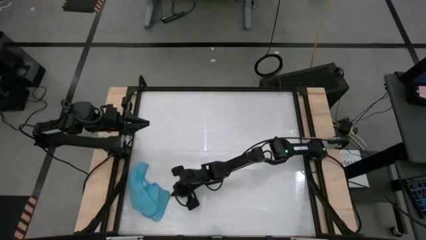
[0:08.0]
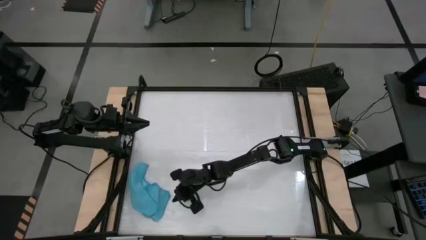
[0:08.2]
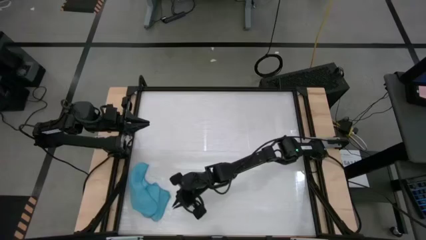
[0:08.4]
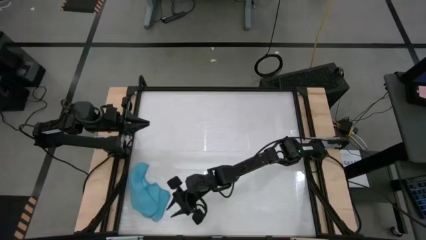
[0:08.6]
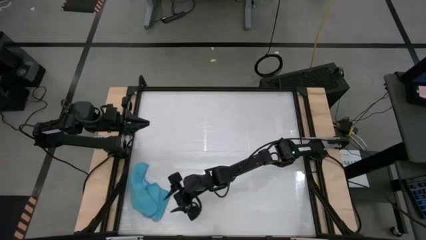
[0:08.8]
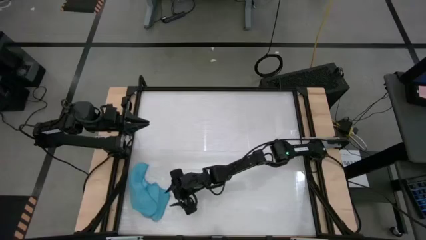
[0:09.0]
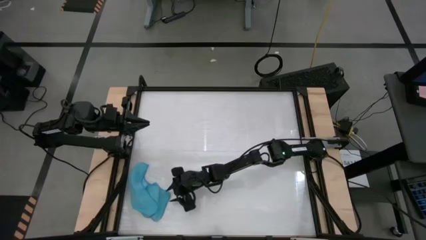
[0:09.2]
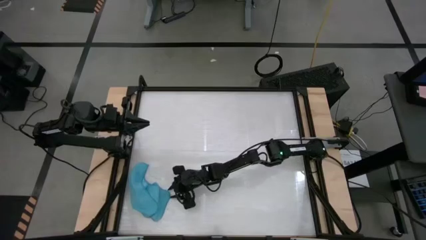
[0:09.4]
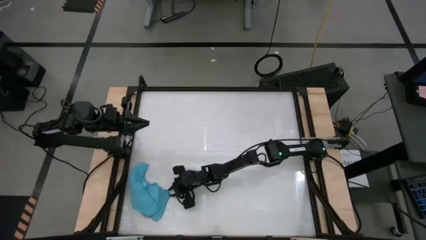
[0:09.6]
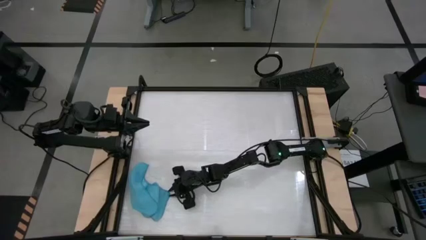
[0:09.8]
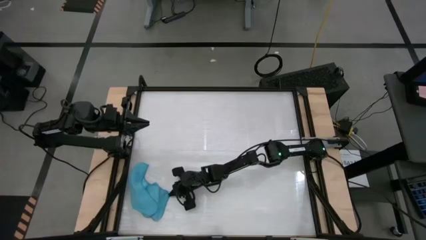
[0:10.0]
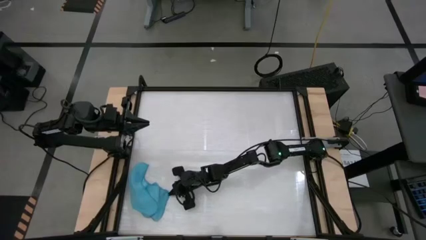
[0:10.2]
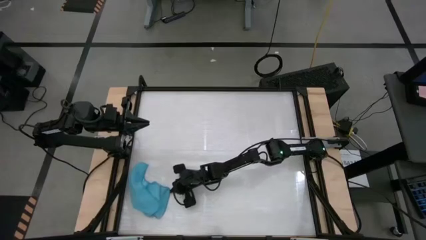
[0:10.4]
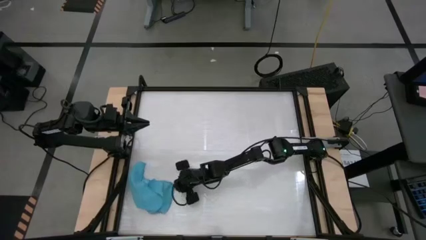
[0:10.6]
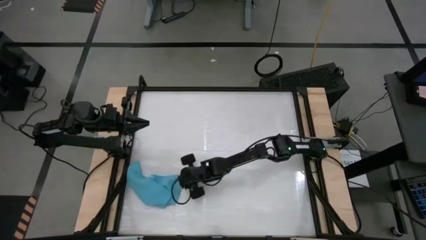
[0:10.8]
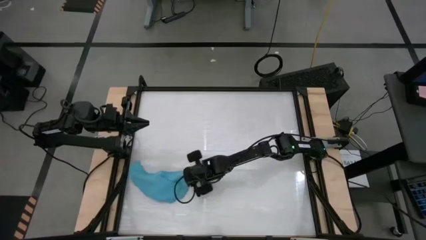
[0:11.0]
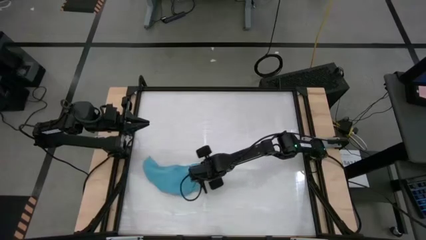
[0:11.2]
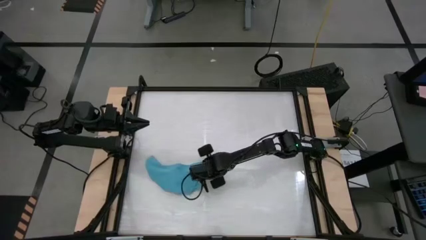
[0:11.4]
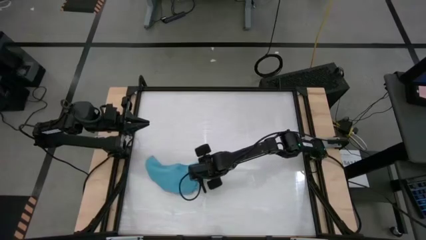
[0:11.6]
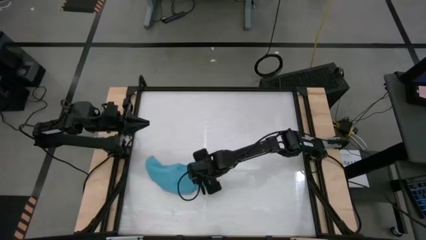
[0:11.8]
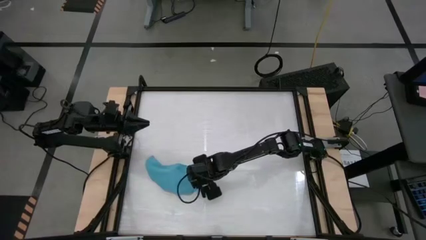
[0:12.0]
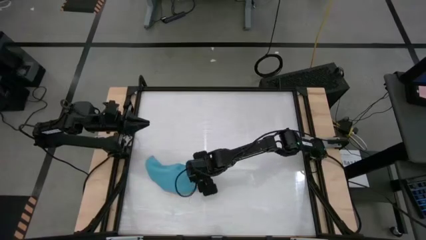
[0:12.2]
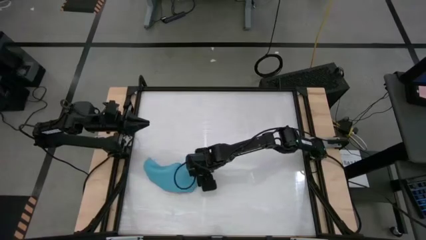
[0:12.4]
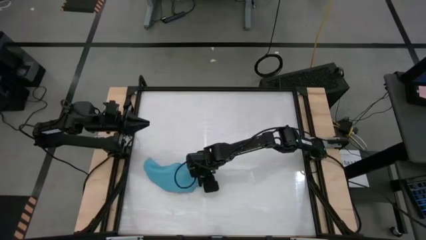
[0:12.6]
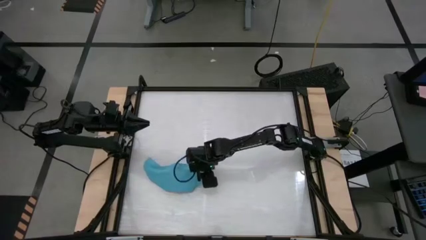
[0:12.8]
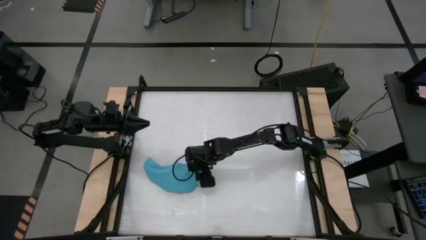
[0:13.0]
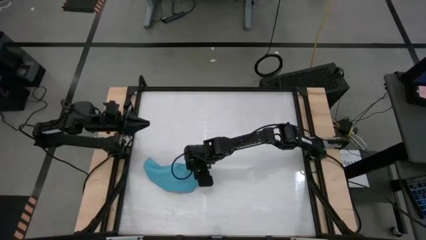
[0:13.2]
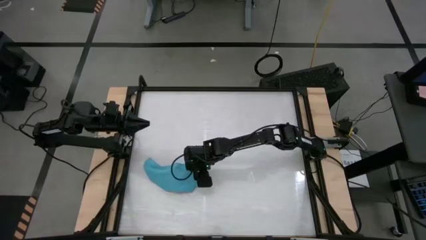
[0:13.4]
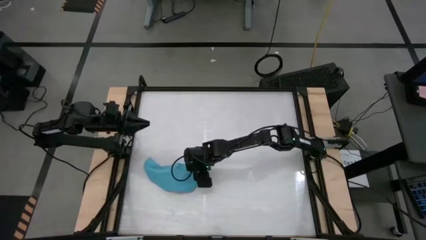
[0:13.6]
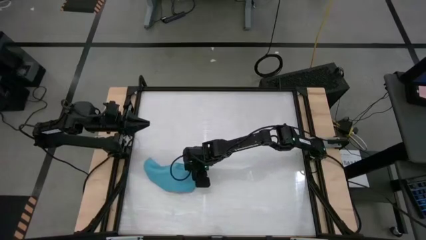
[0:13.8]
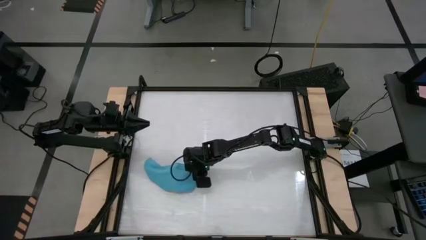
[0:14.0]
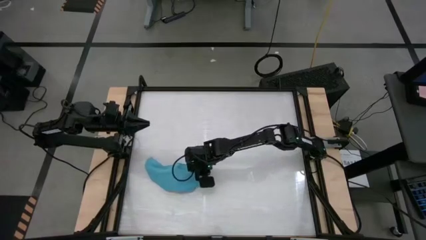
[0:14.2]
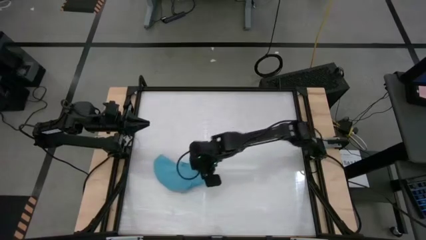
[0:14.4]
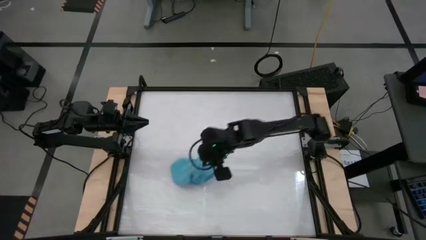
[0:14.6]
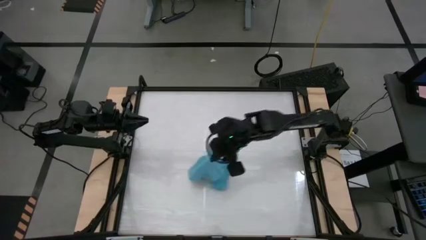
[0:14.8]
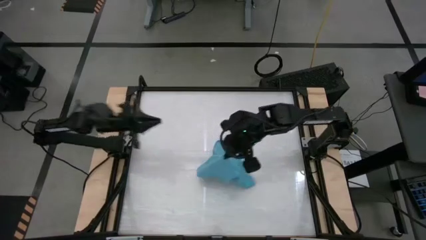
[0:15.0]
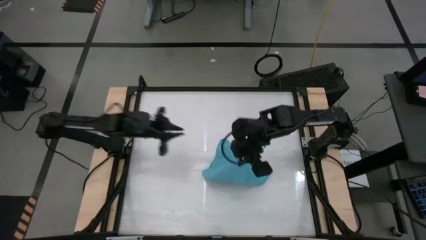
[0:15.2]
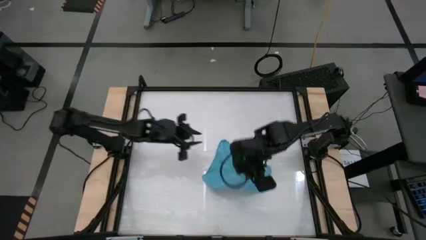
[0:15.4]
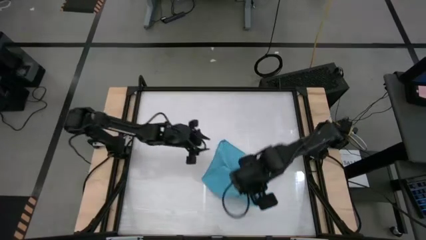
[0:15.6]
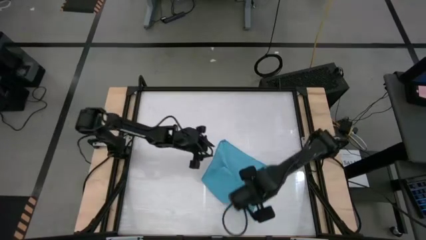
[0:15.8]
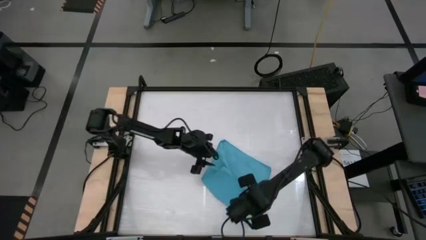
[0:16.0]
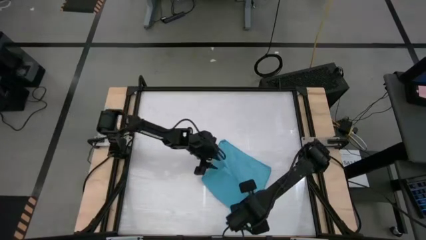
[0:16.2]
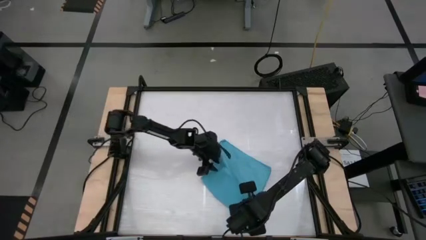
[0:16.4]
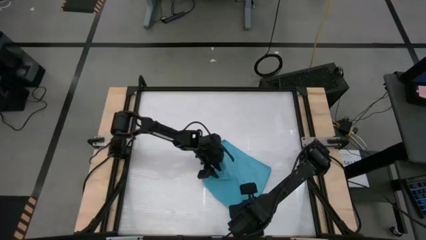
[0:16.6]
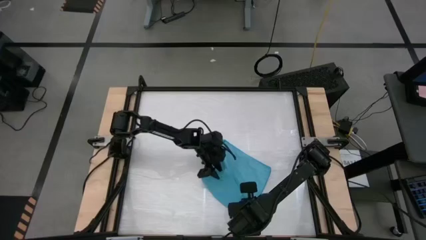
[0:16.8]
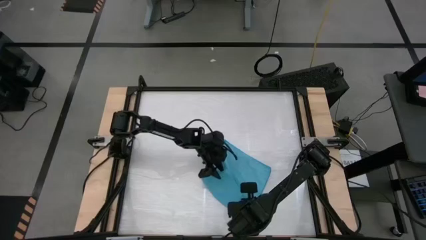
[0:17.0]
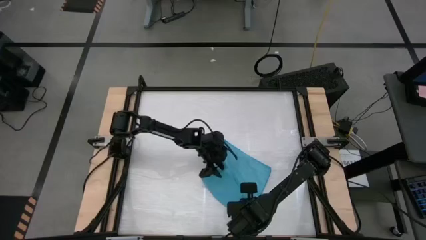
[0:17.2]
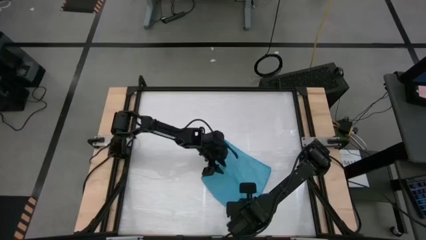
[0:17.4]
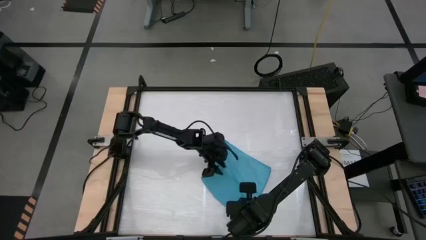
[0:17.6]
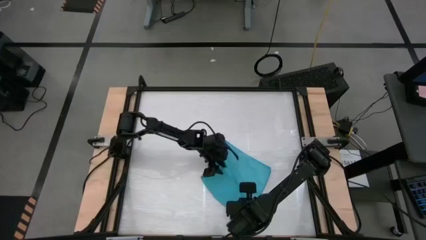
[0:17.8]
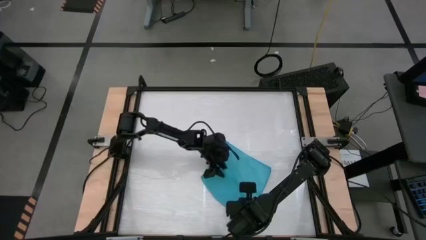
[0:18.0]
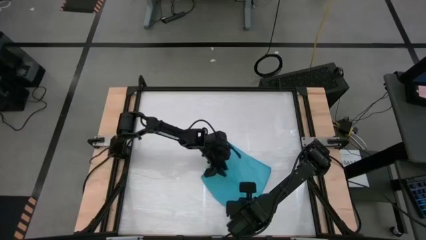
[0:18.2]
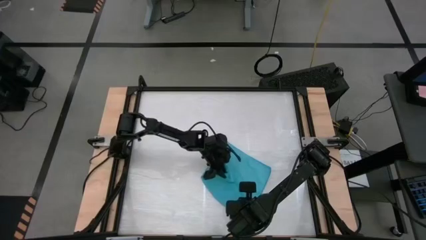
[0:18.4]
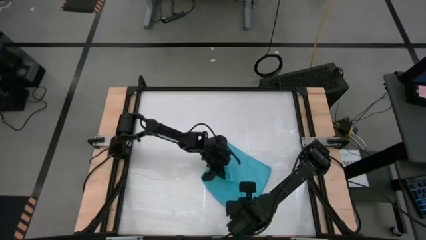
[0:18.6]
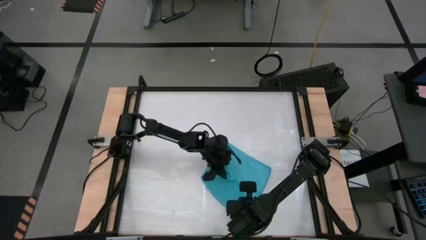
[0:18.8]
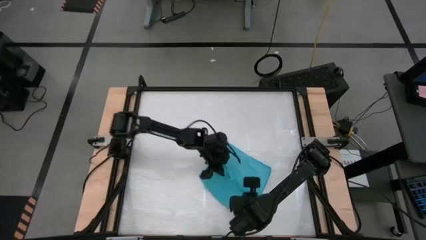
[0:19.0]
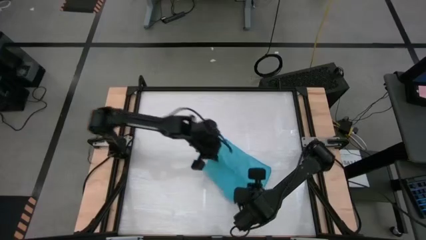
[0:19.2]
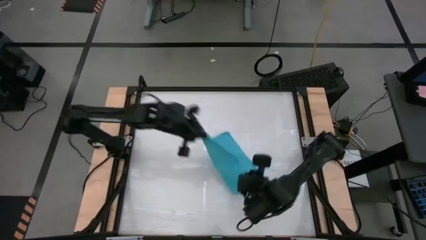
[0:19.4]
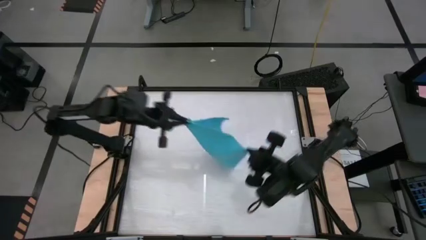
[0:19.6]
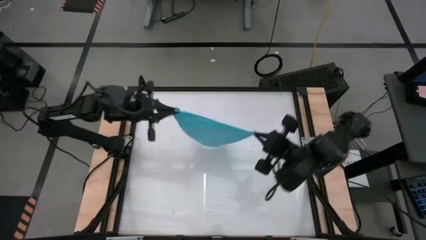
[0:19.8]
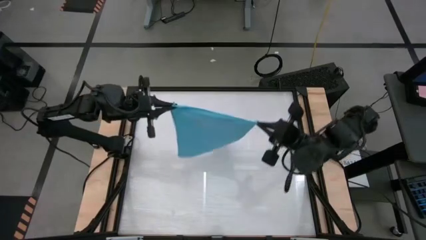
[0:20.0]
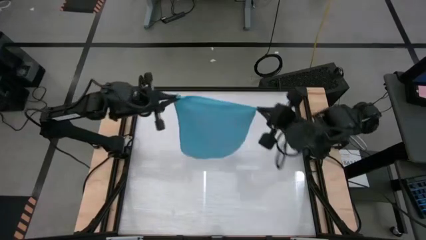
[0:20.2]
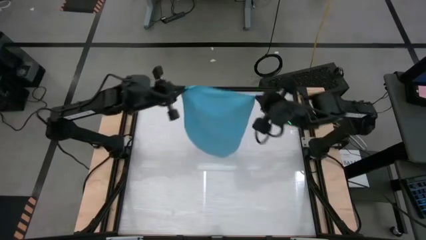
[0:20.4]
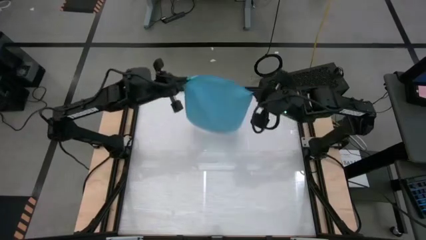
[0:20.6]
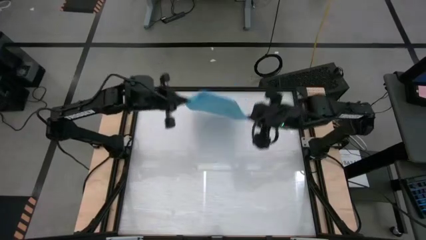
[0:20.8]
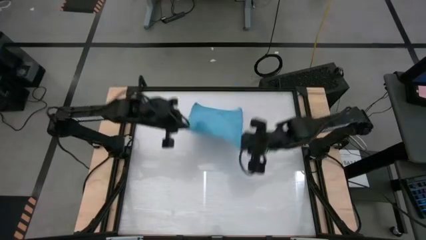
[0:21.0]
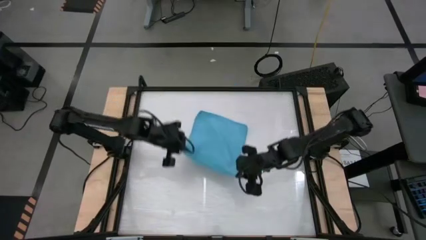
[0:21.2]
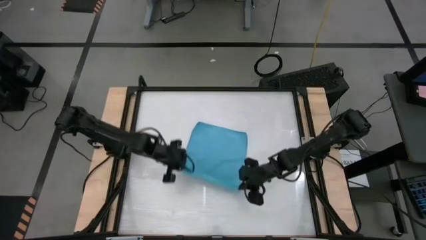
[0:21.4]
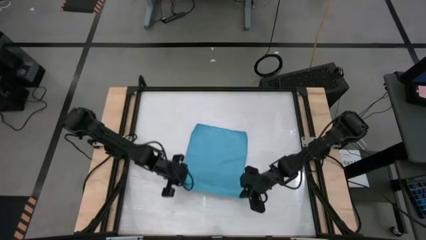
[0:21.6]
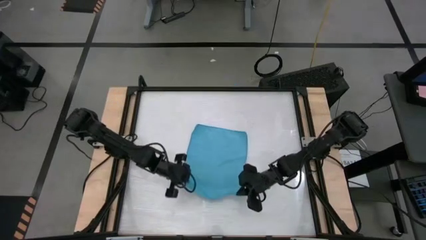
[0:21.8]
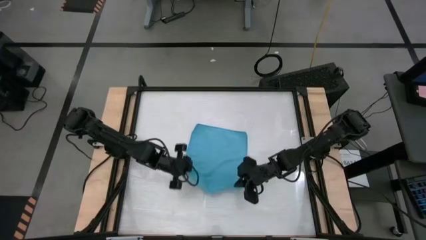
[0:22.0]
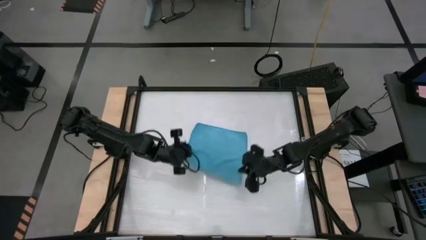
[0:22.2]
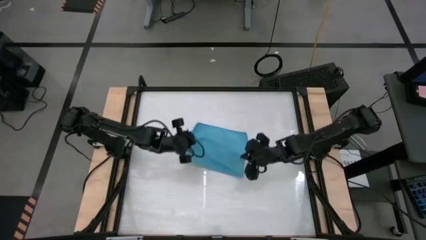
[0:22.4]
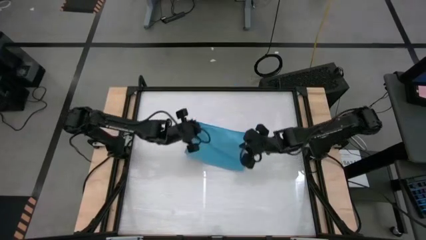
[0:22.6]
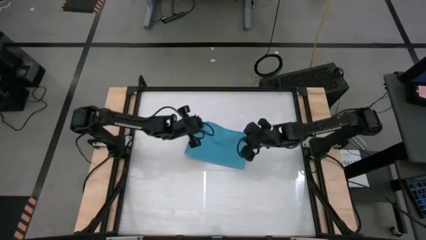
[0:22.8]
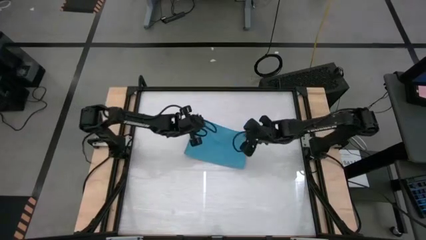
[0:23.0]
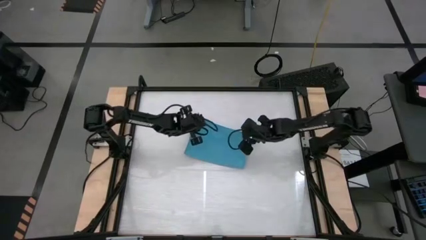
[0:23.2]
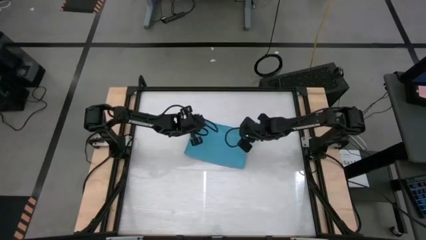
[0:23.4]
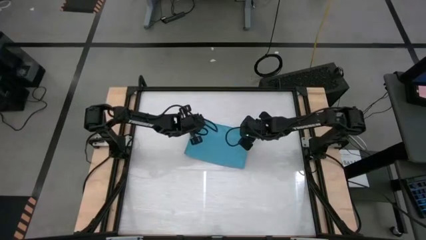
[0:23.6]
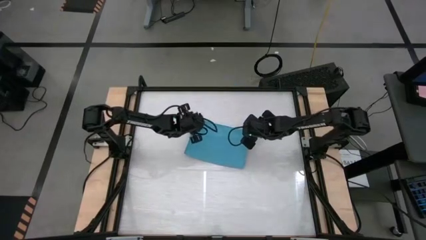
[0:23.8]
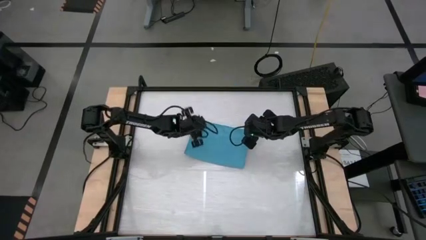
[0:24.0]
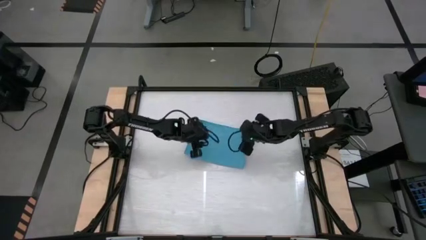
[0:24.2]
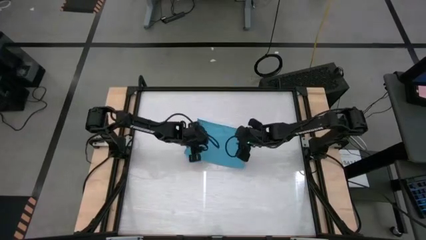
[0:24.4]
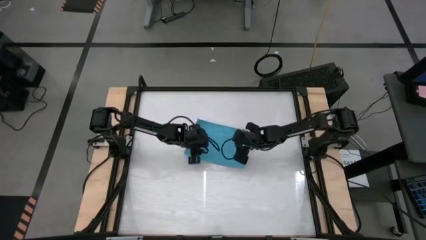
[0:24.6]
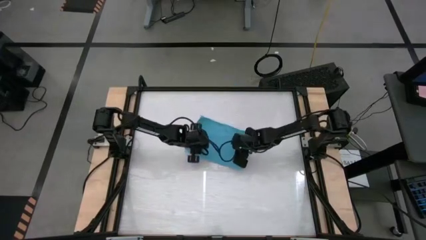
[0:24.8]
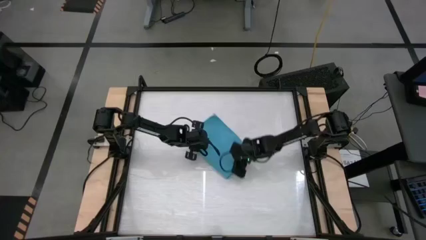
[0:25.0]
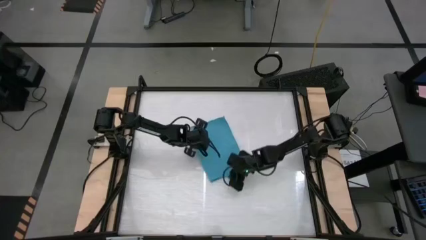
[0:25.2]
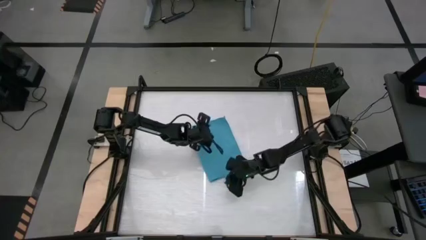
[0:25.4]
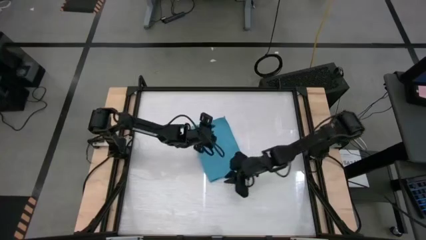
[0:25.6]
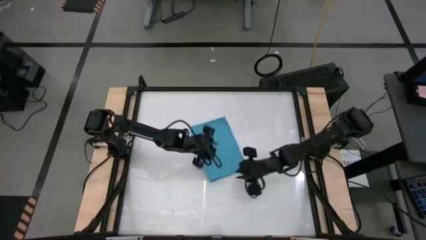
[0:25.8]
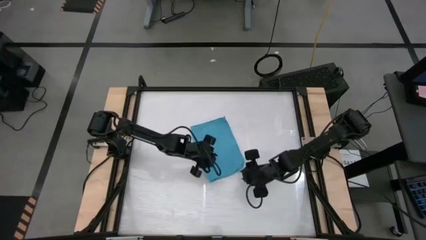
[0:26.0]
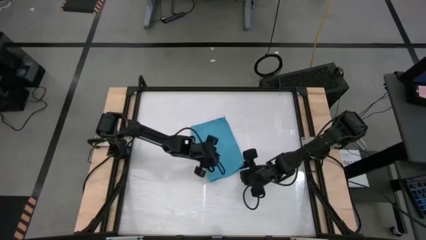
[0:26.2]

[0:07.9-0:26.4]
Task: Roll towel
Roll the blue towel
